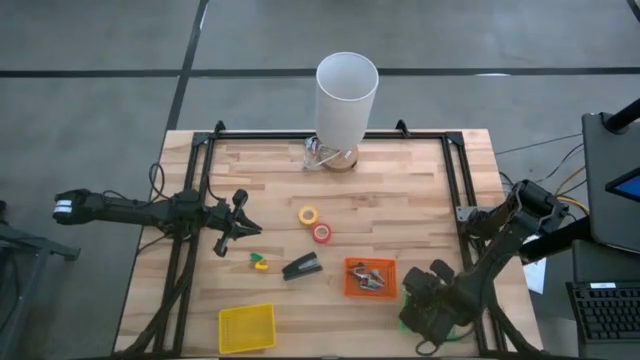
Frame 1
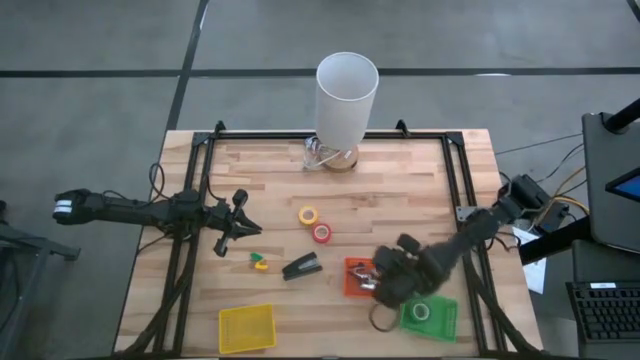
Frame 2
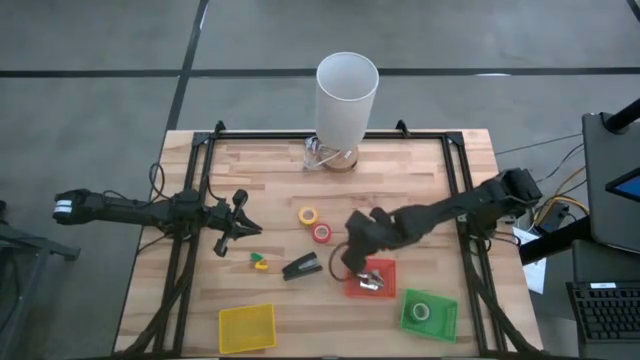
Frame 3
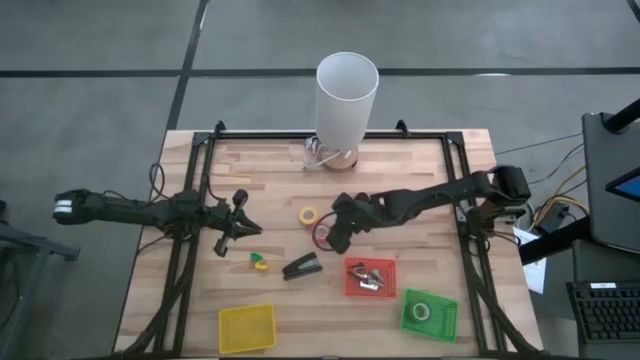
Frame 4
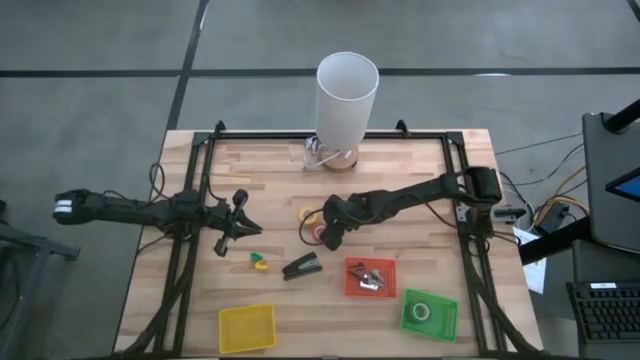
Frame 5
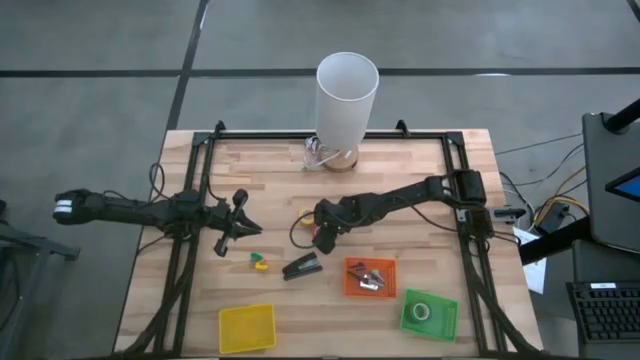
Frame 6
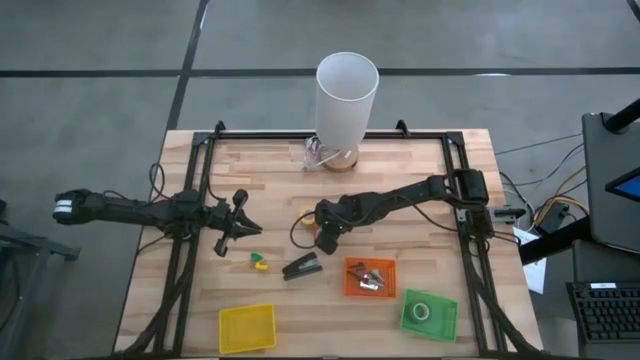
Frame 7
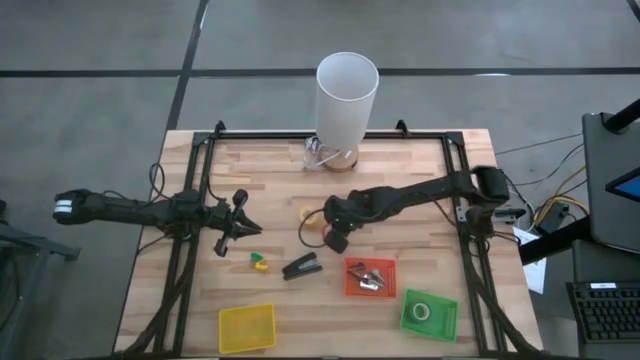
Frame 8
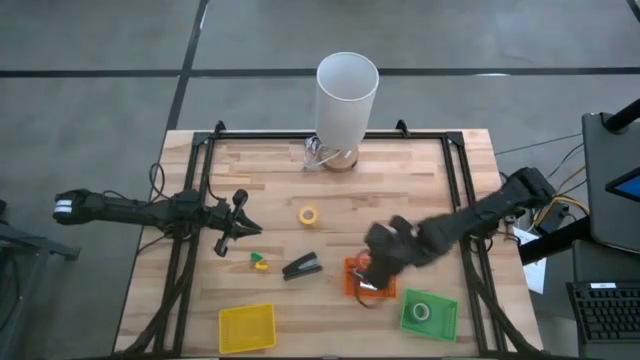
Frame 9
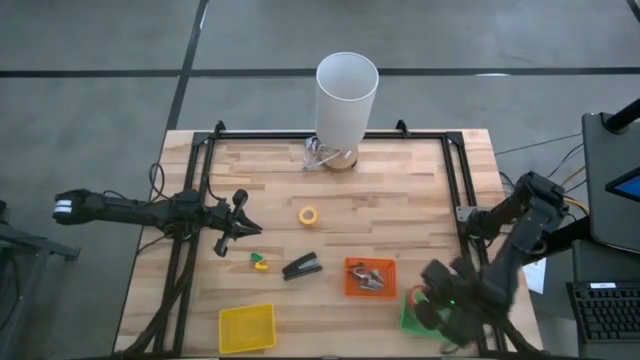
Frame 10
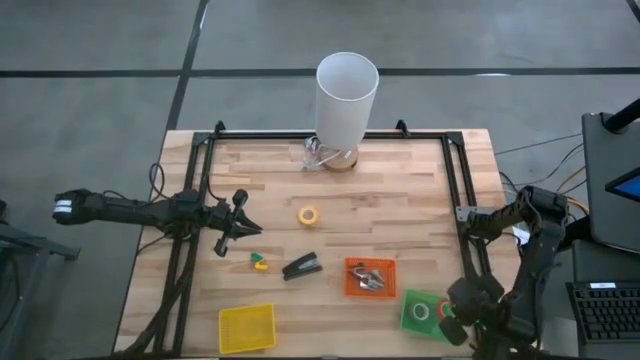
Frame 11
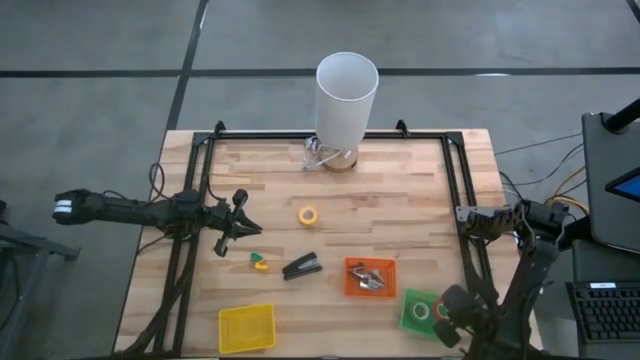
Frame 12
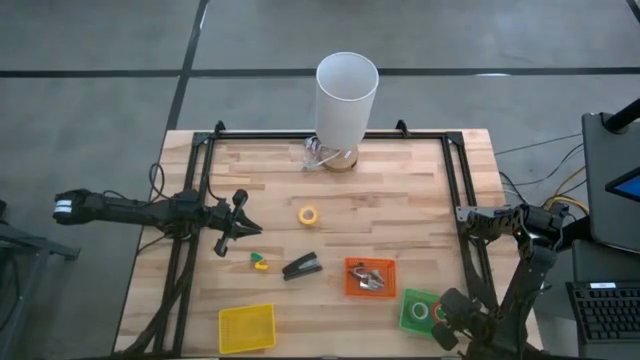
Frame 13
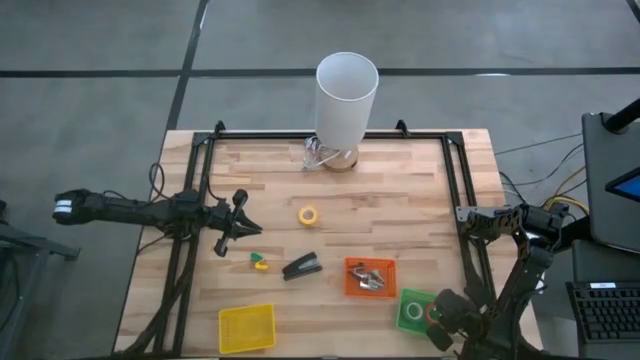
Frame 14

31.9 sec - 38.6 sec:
Task: Pick and place Stapler, Stapler remover, tape
Put the red tape into the green basket

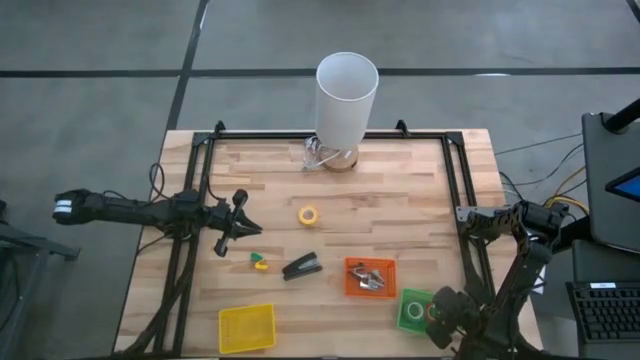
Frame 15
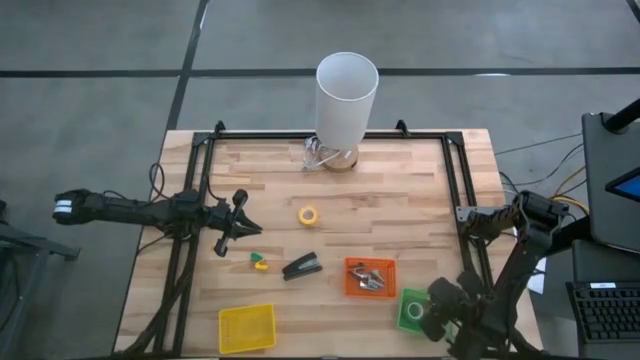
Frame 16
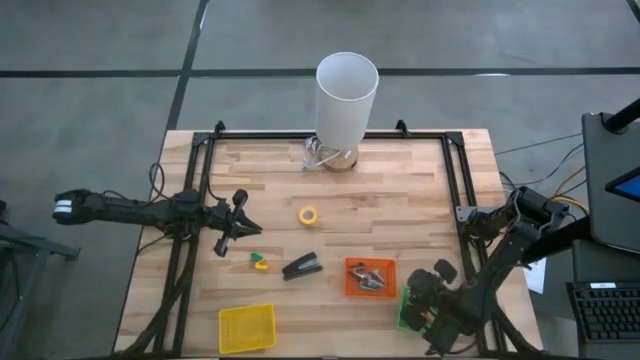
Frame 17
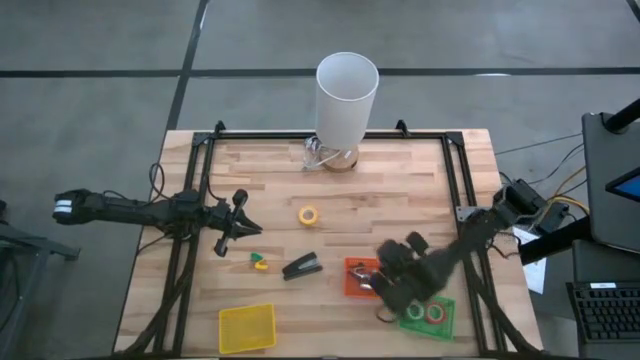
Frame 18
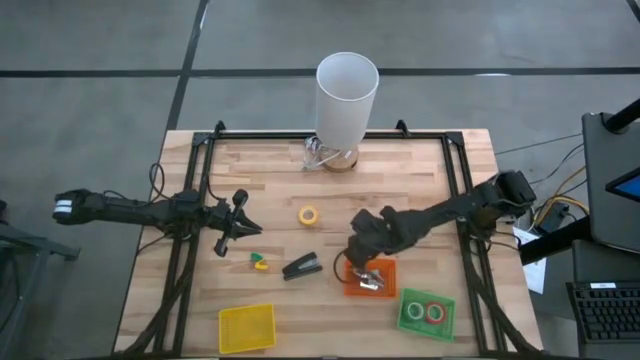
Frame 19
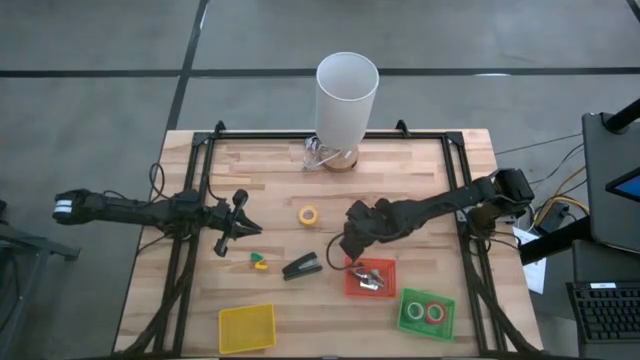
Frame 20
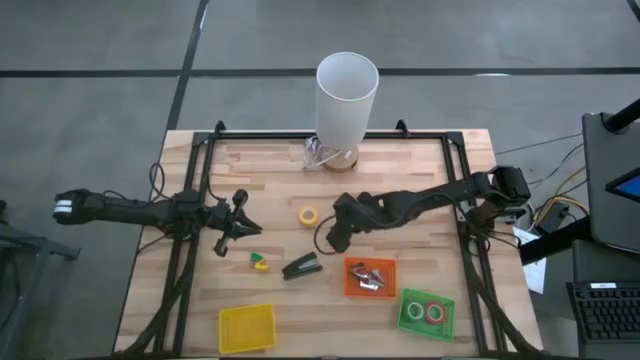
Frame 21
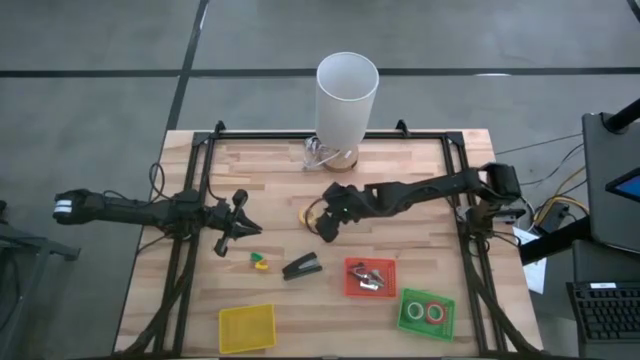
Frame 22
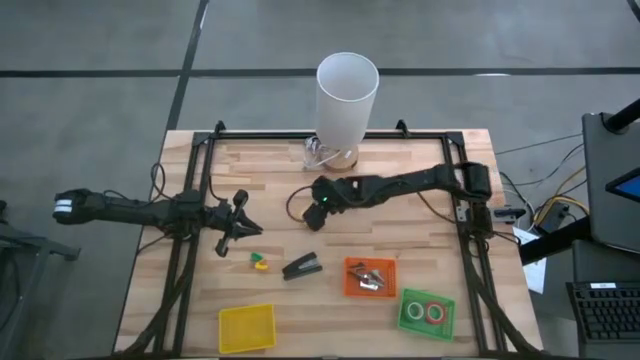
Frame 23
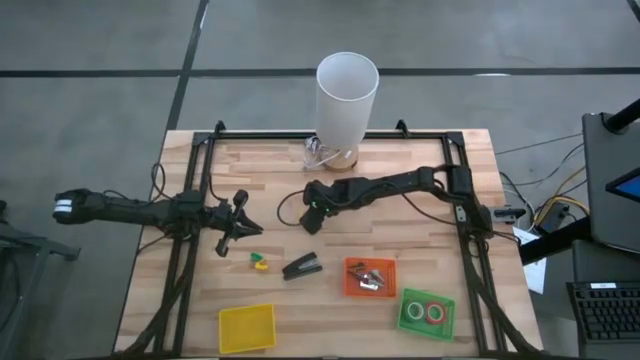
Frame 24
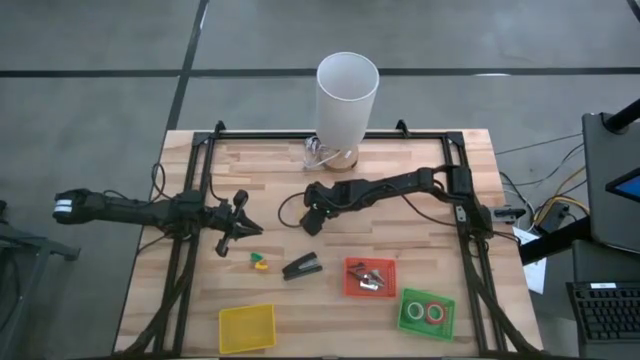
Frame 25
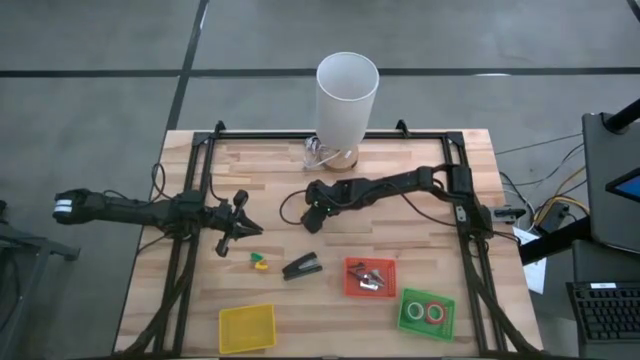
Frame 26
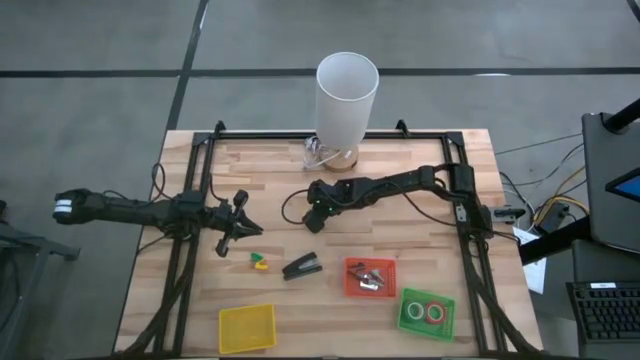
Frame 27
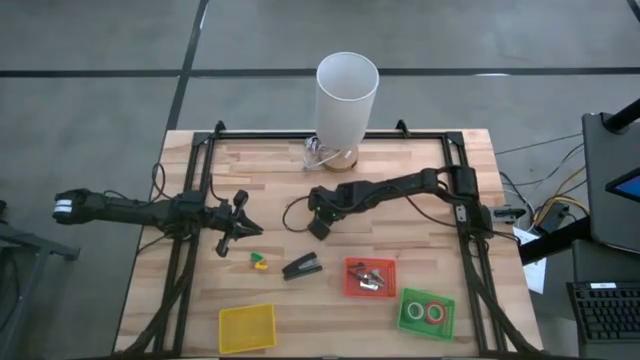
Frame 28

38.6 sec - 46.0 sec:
Put the yellow tape into the green basket

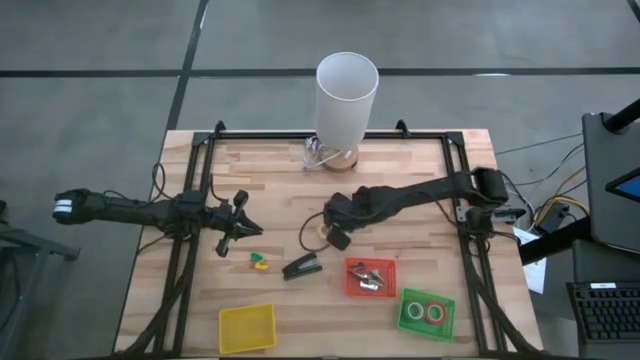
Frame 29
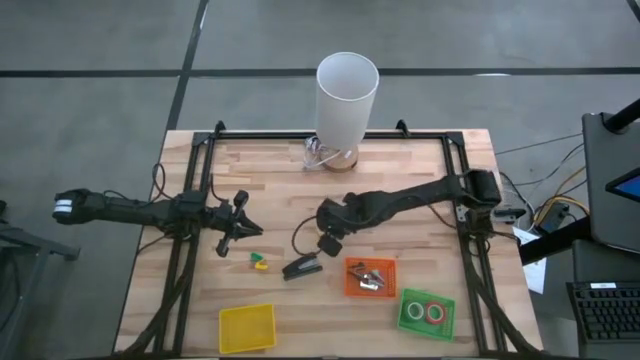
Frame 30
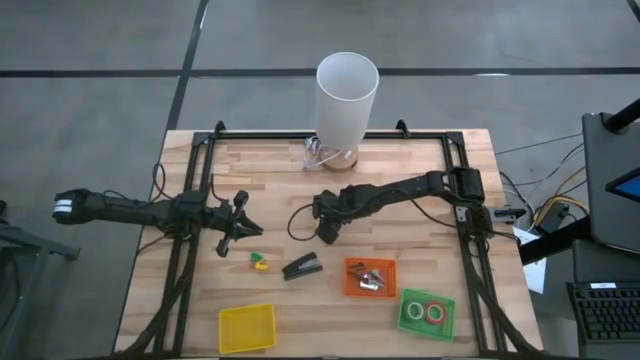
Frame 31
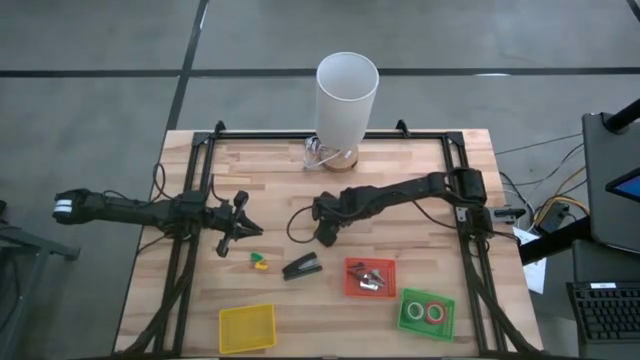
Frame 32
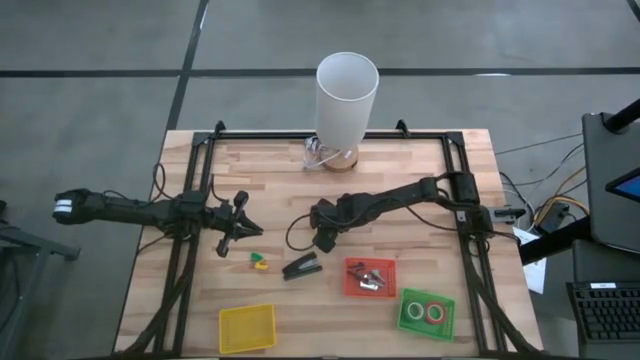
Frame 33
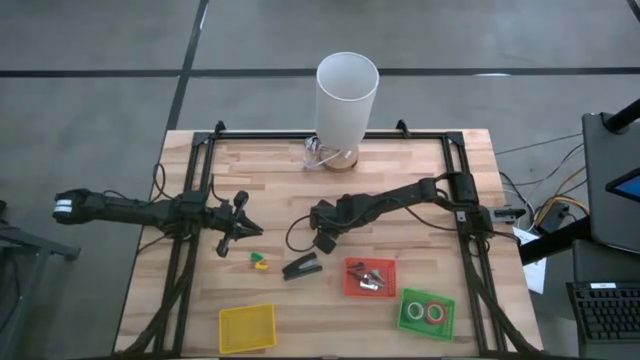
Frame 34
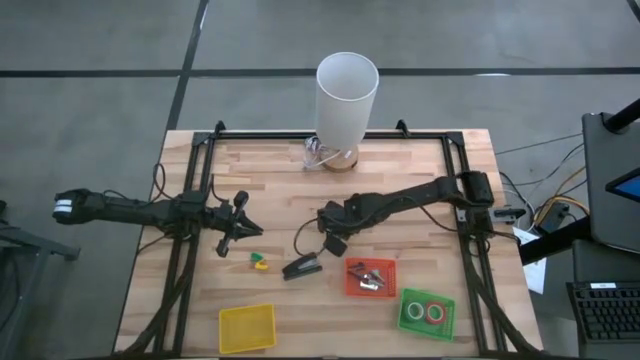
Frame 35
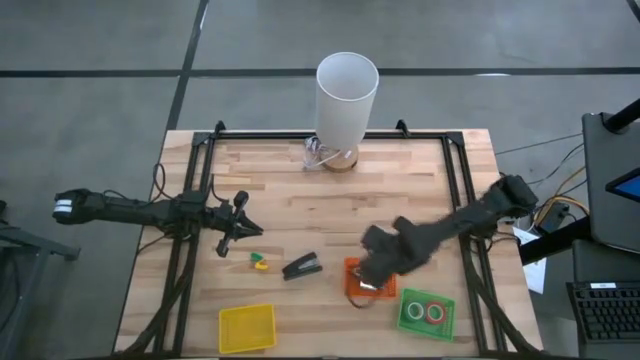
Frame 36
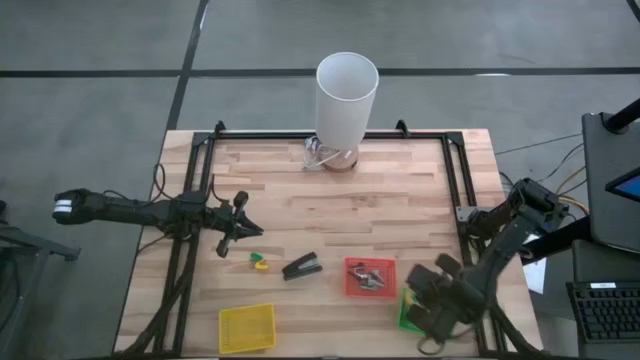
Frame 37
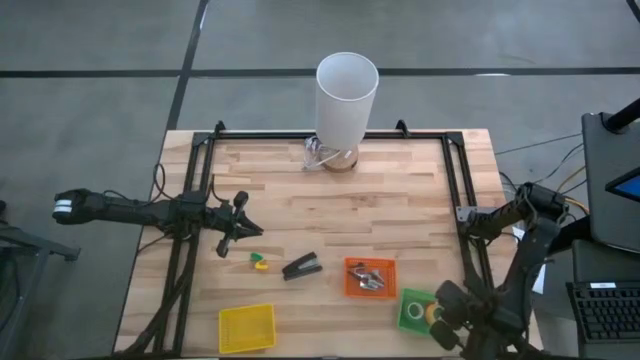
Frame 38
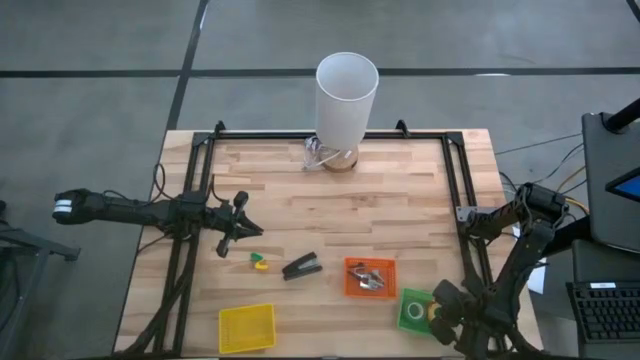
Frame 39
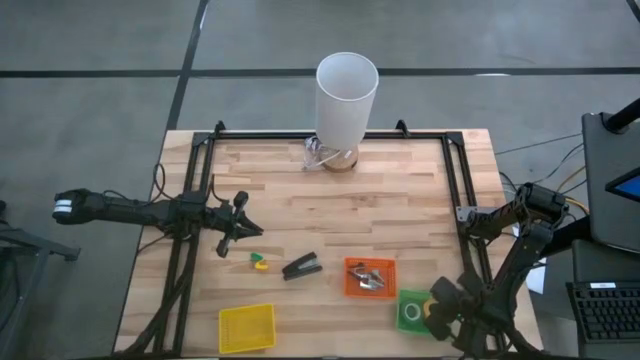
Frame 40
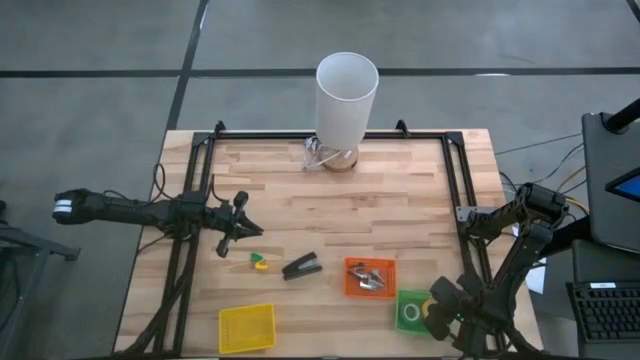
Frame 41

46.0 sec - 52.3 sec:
Put the yellow tape into the green basket
